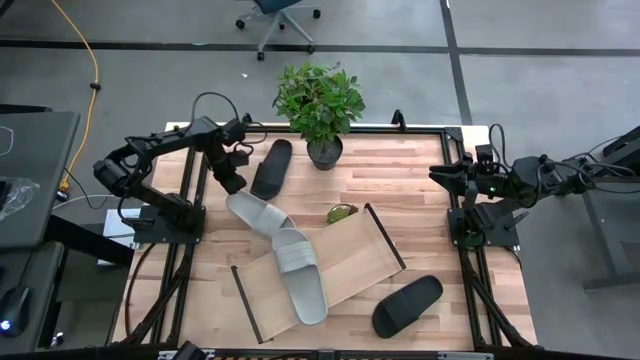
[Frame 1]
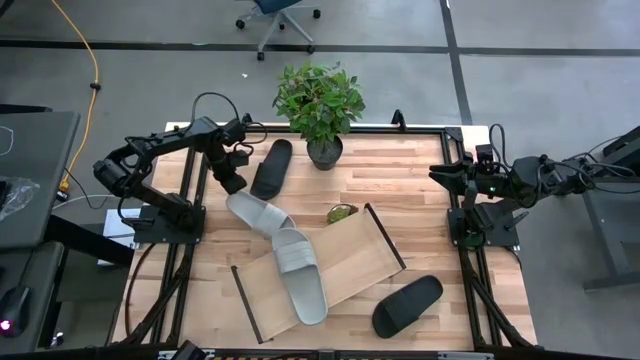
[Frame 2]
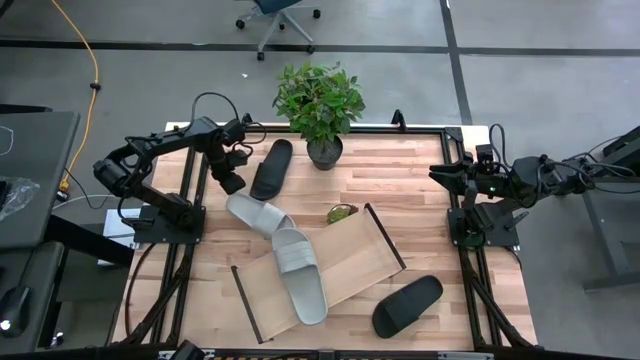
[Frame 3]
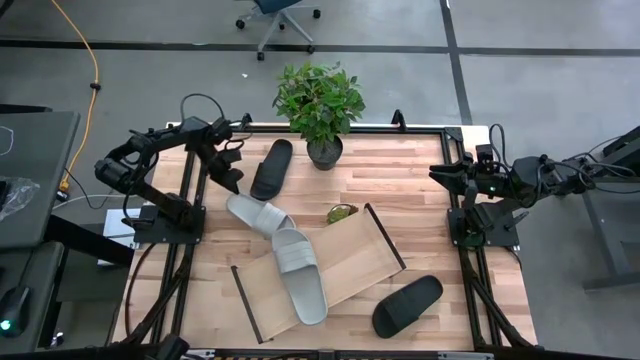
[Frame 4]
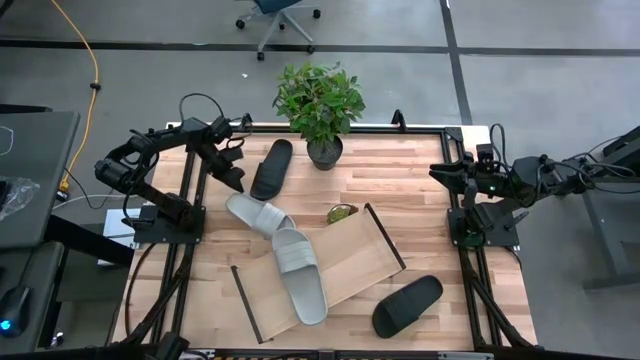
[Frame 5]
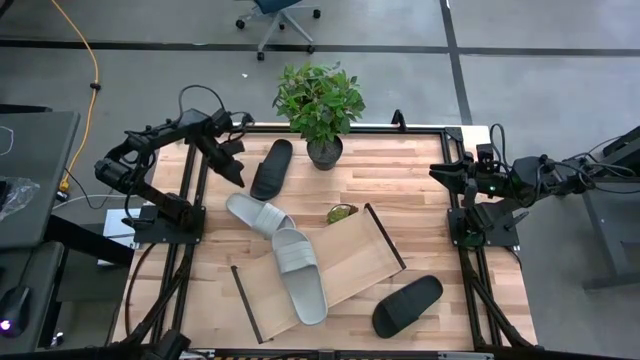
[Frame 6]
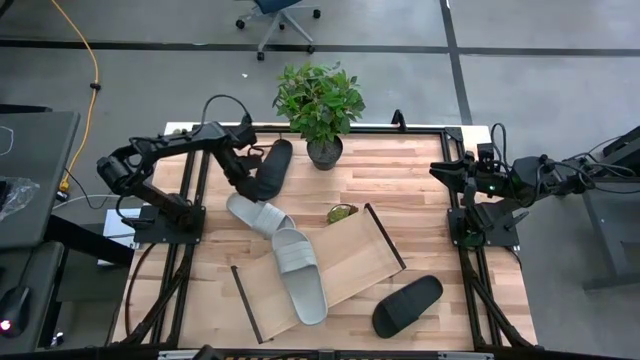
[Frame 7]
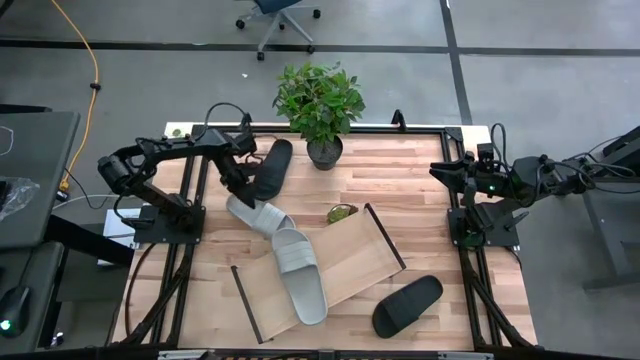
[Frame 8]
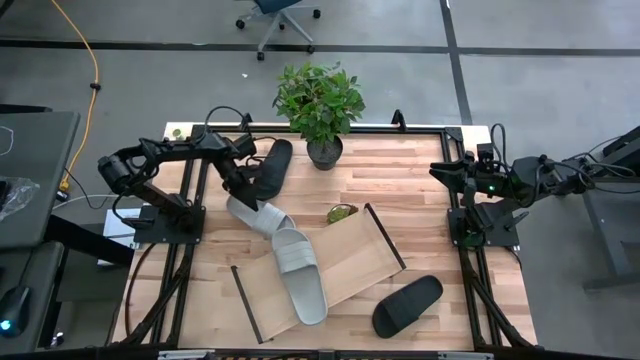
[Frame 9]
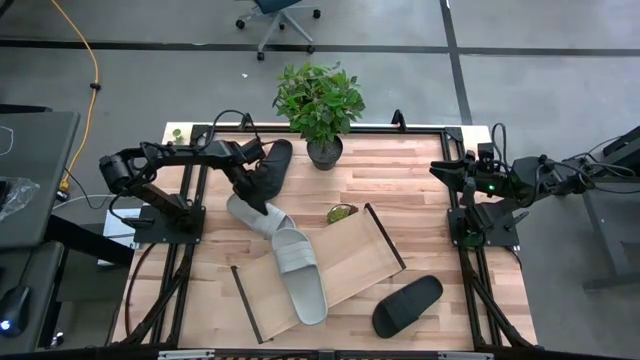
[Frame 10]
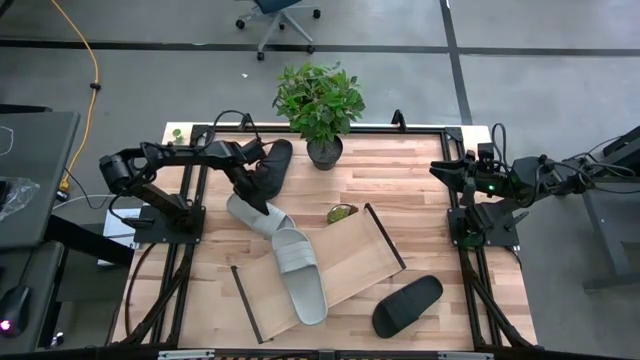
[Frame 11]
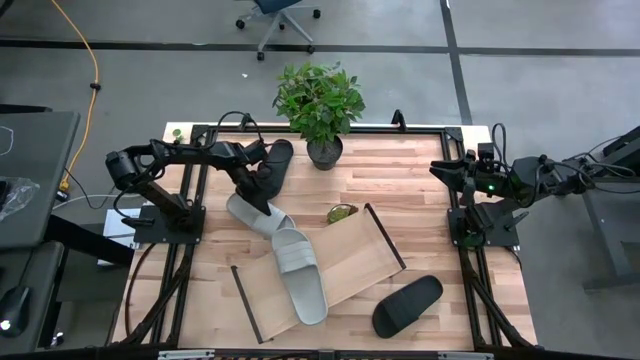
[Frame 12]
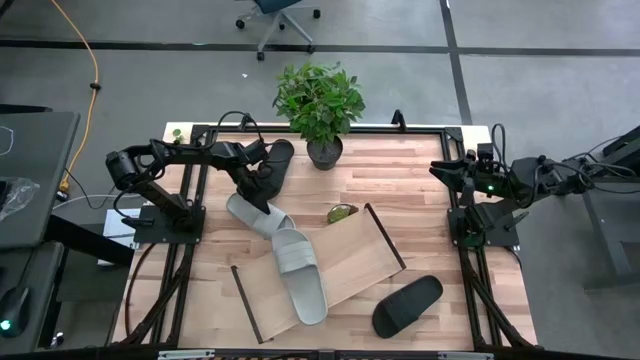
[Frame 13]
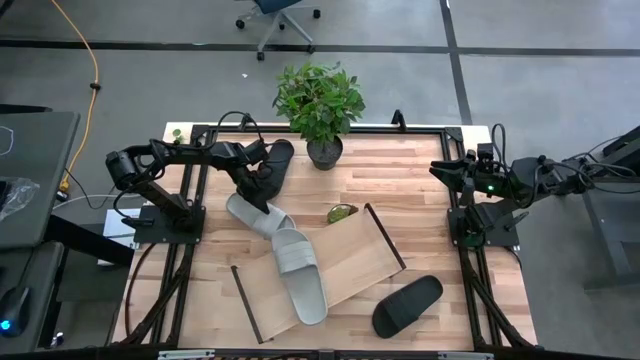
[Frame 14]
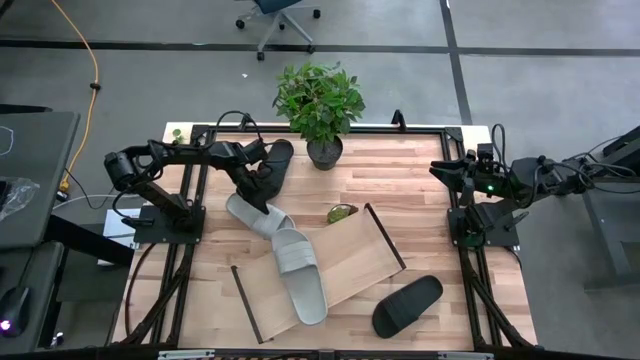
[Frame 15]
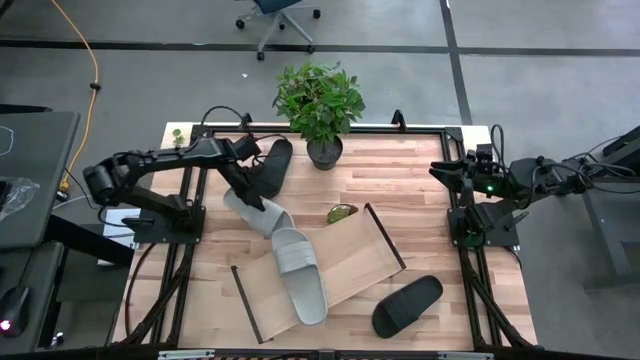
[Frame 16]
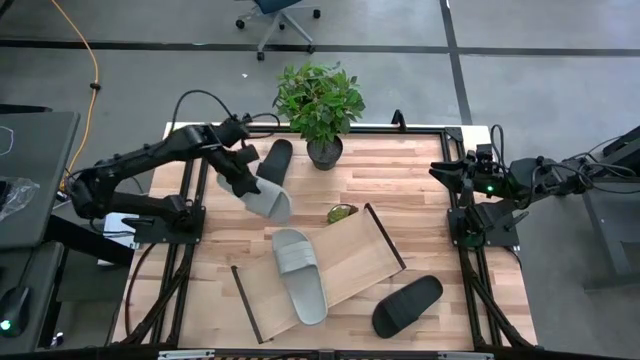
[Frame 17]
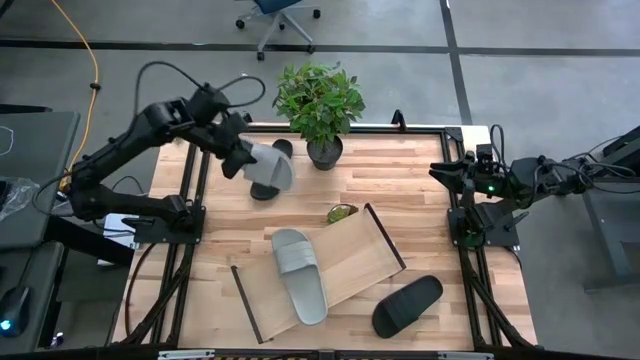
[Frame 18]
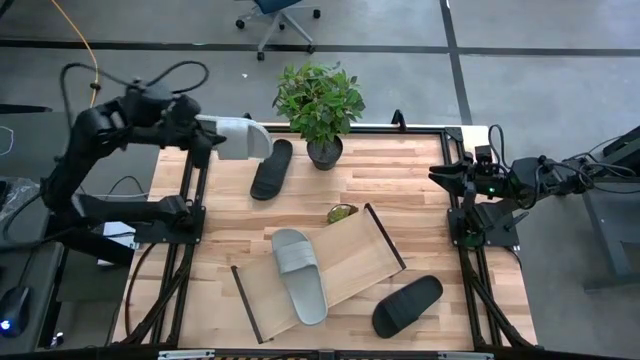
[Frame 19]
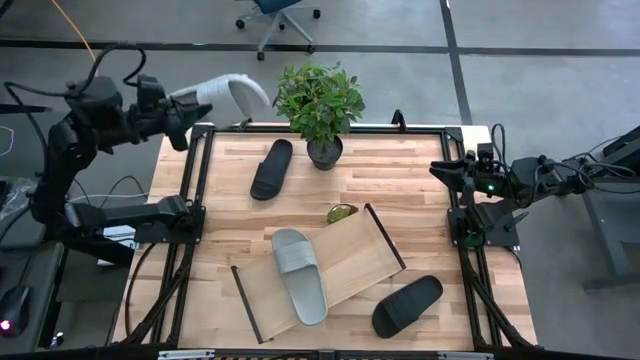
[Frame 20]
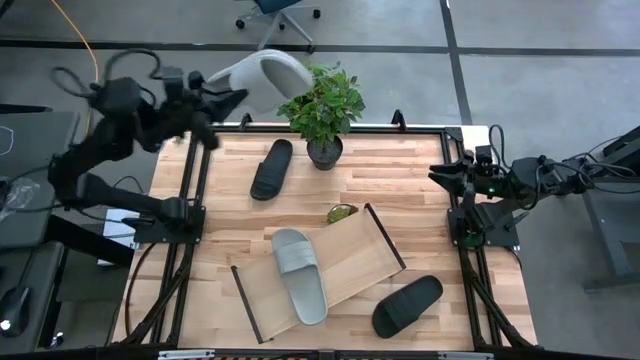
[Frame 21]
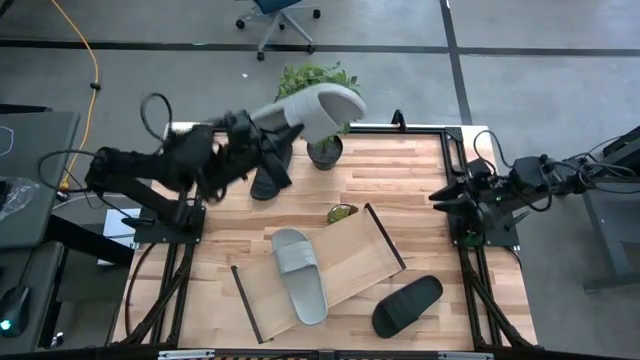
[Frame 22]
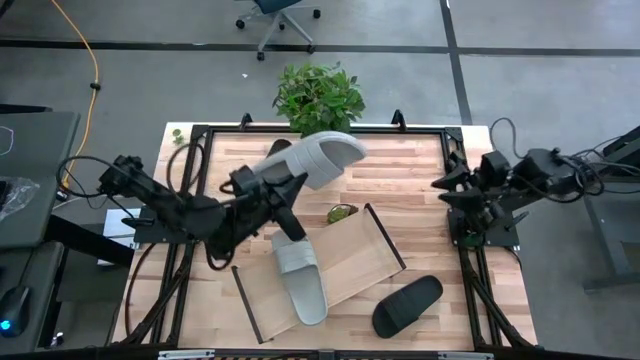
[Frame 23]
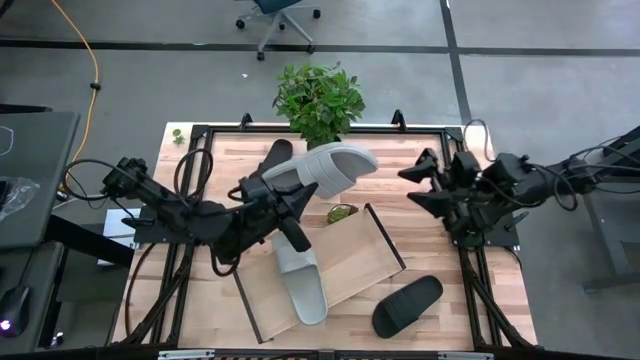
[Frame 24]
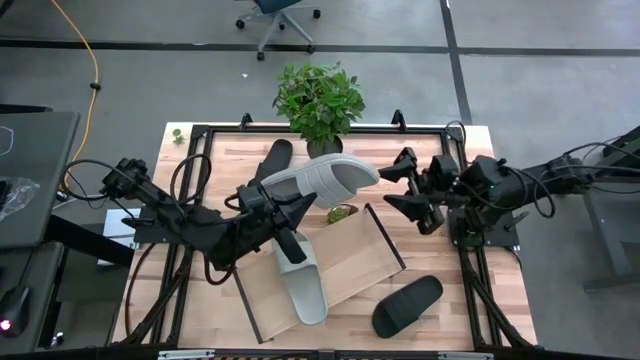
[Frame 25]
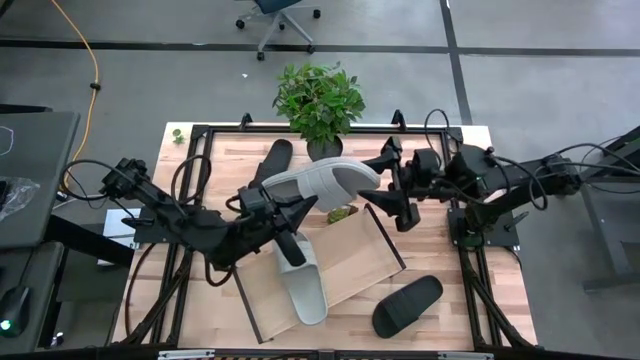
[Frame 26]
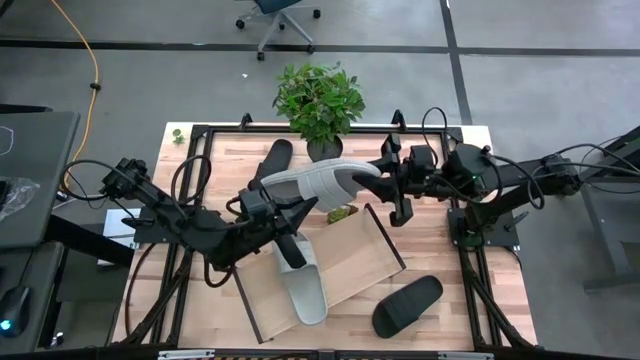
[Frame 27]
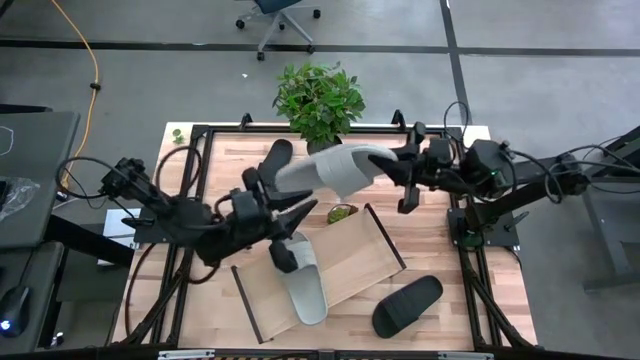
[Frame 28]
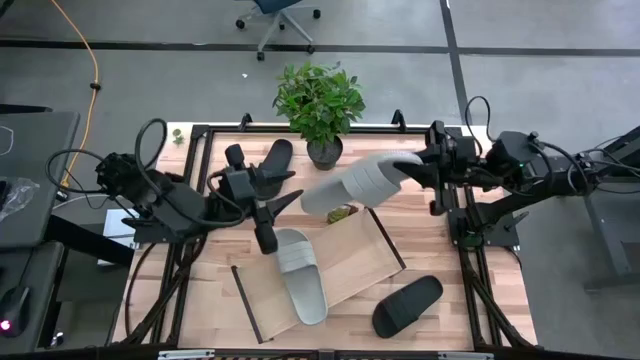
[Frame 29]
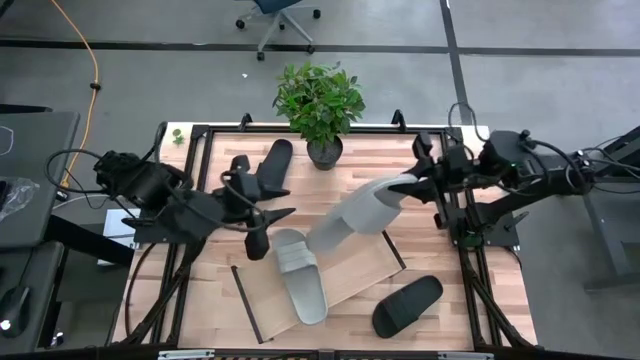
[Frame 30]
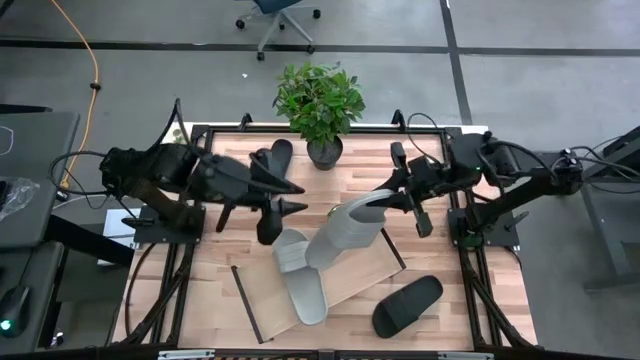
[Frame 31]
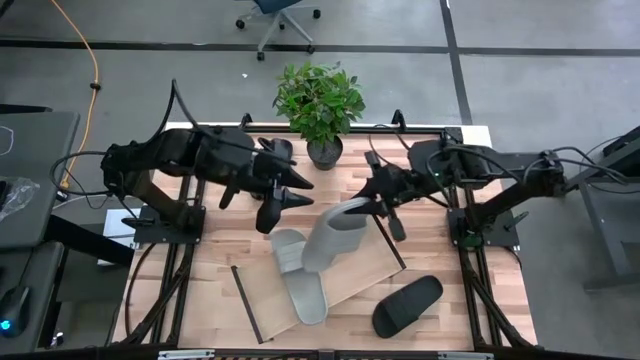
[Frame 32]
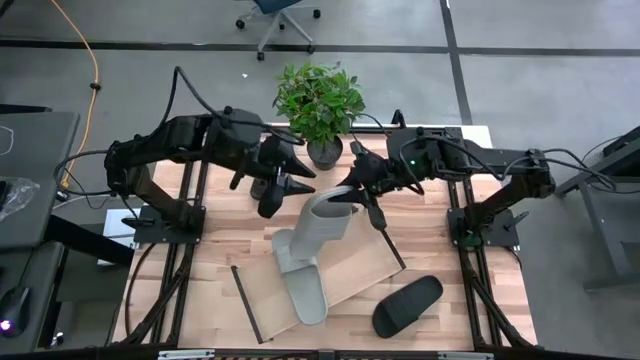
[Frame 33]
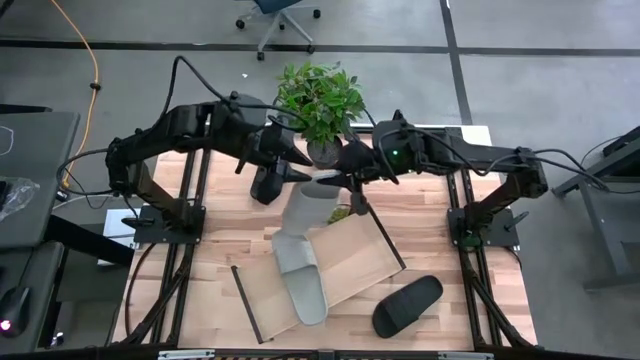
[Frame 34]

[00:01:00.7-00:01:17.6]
Task: Pick and place slides into the shelf
Put the gray slipper on the shelf

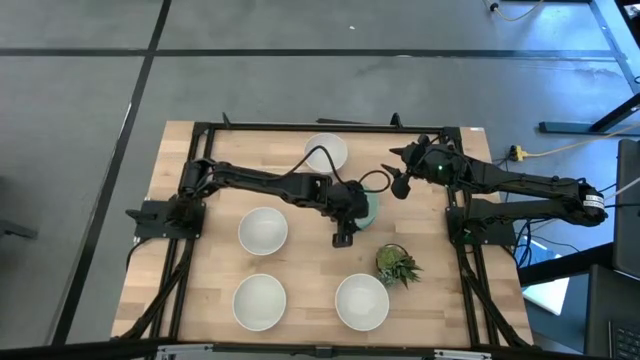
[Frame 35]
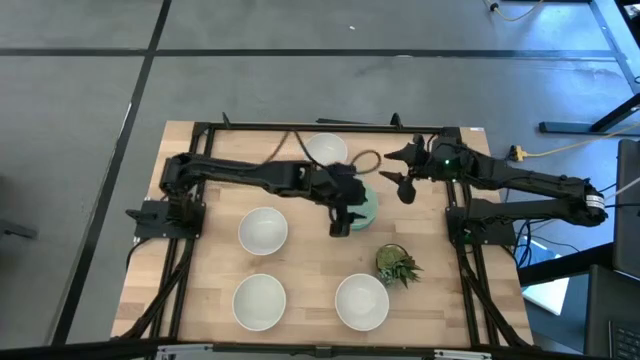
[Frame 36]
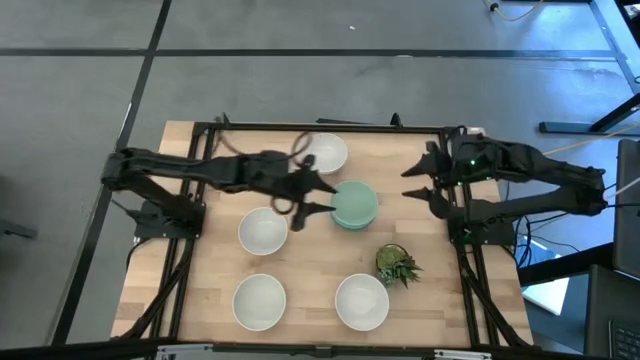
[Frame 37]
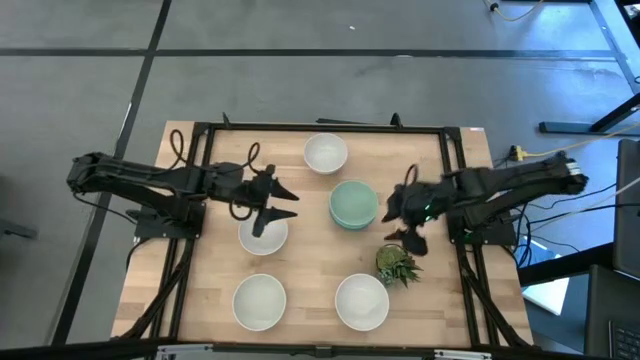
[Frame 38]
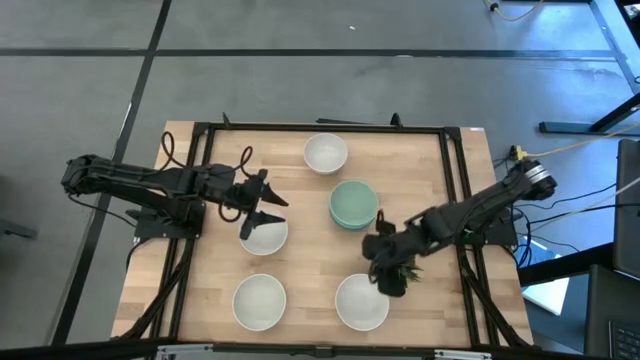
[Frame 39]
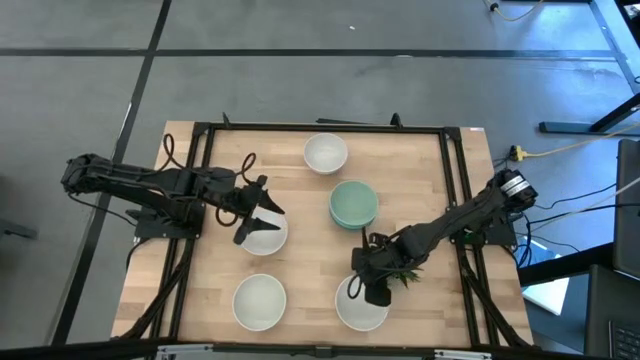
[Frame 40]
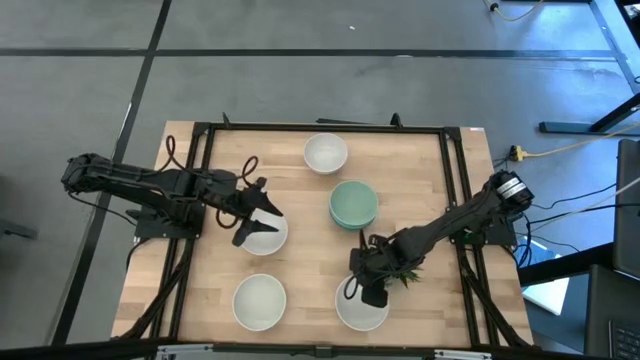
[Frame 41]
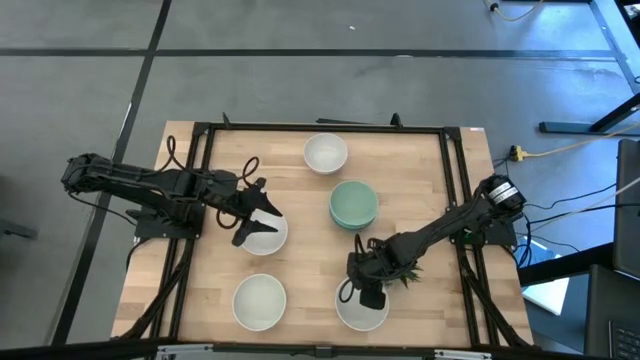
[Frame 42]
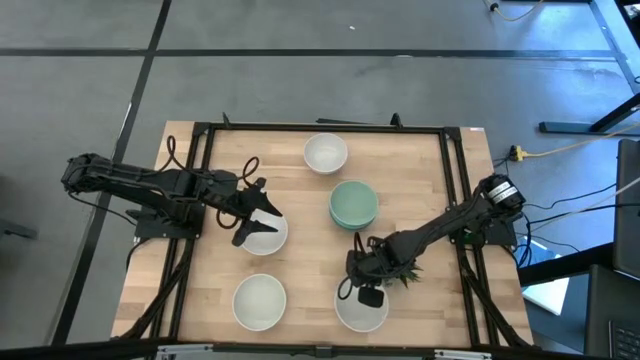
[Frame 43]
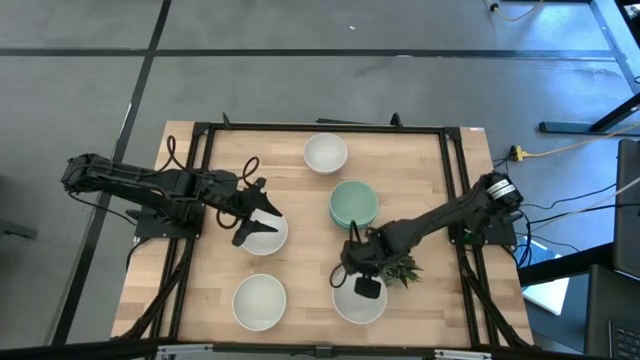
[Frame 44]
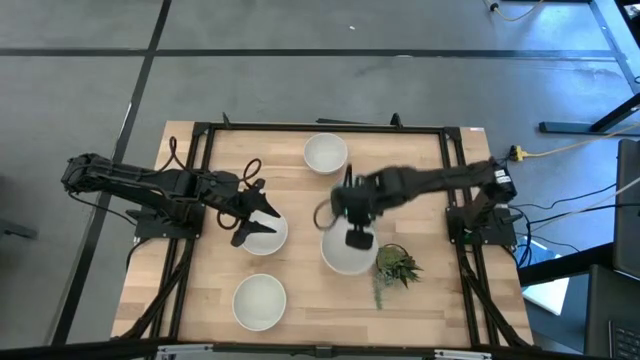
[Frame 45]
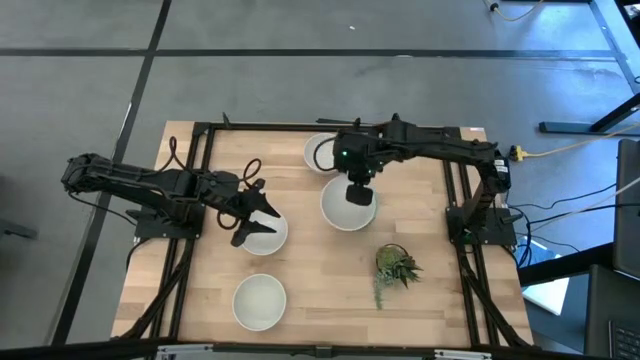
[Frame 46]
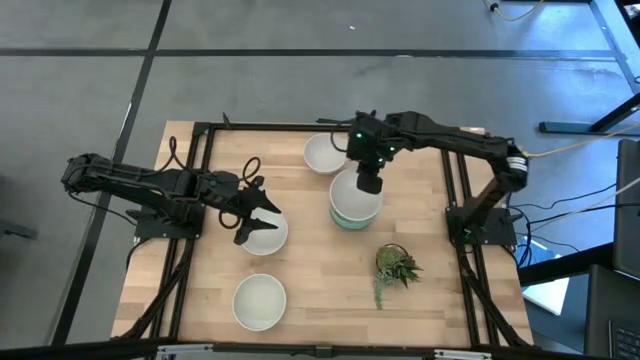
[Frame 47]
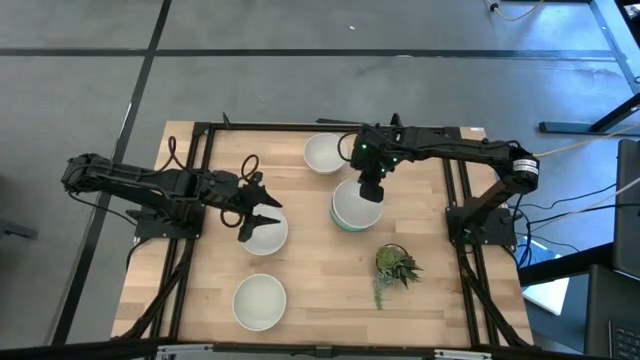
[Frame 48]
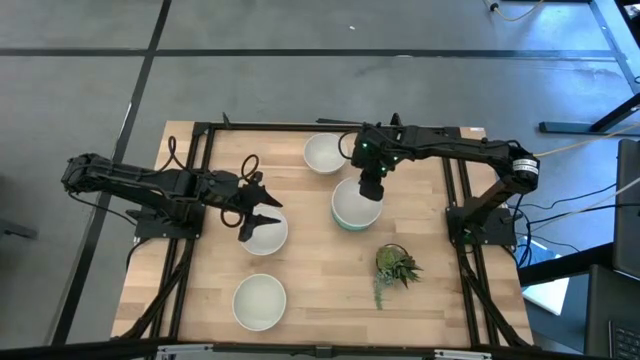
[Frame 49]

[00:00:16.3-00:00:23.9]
Task: Nest bowls inside each other
Stack the bottom right white bowl on the light green bowl
